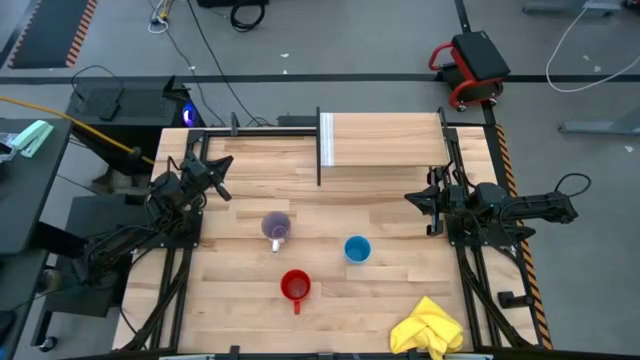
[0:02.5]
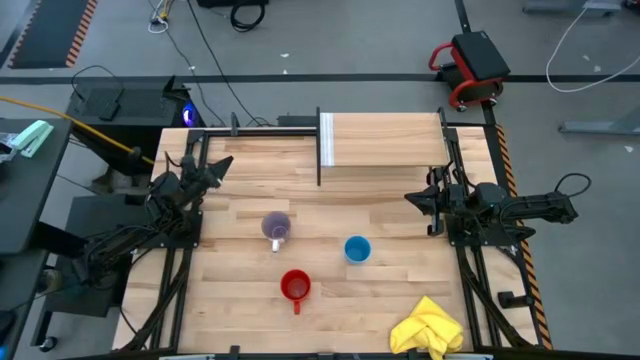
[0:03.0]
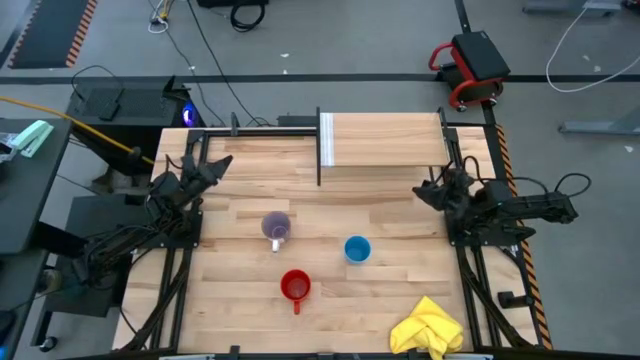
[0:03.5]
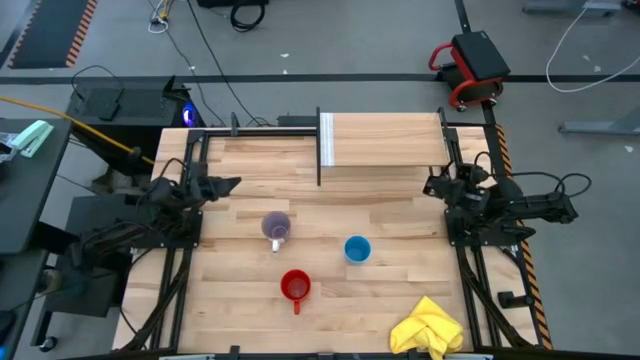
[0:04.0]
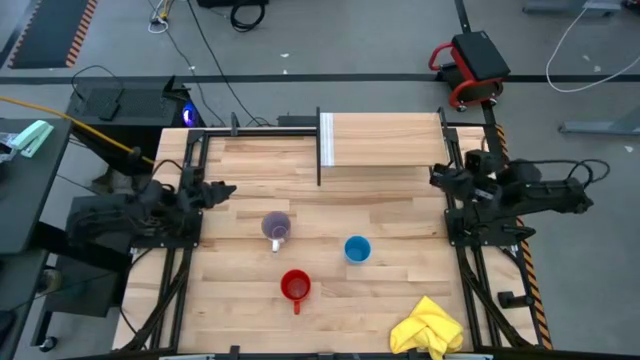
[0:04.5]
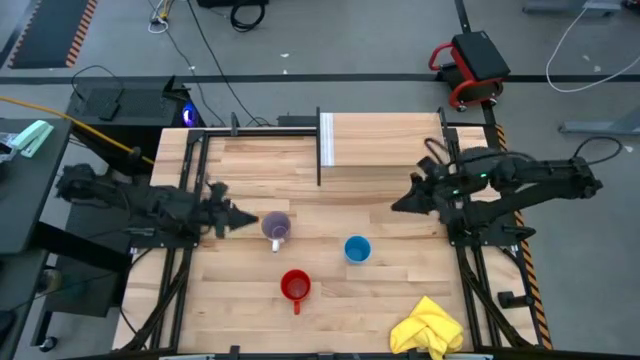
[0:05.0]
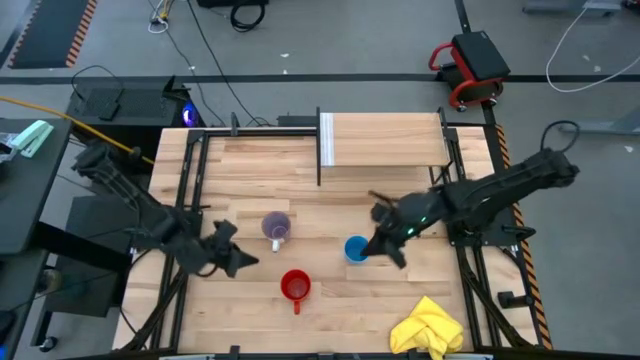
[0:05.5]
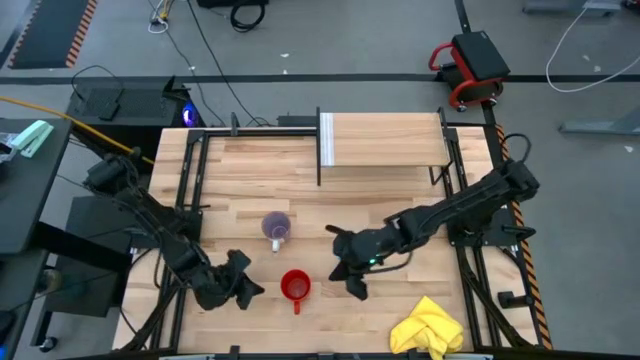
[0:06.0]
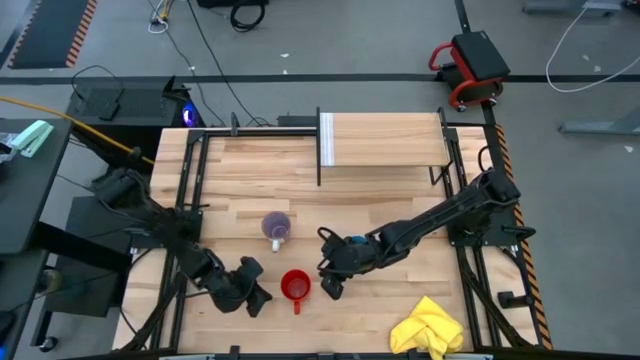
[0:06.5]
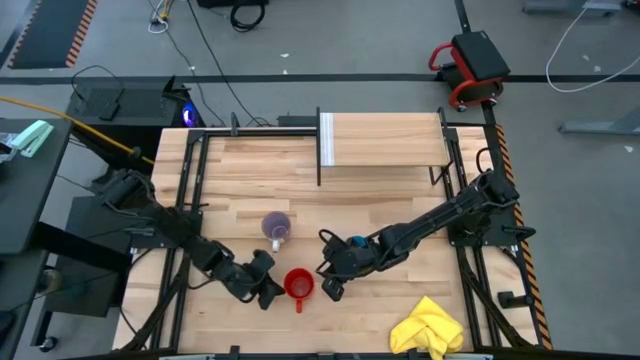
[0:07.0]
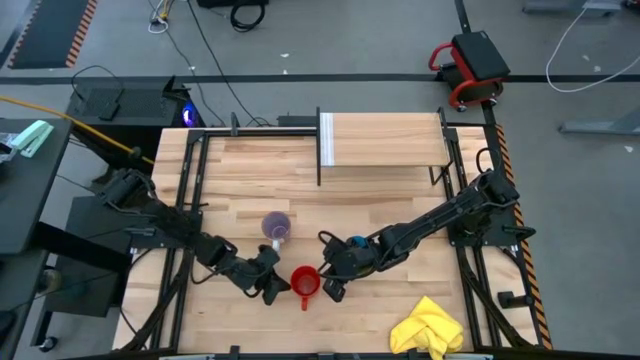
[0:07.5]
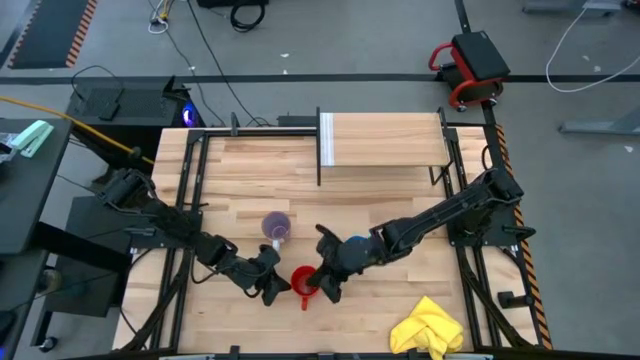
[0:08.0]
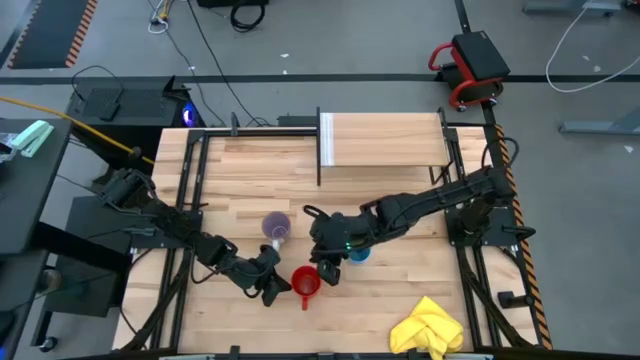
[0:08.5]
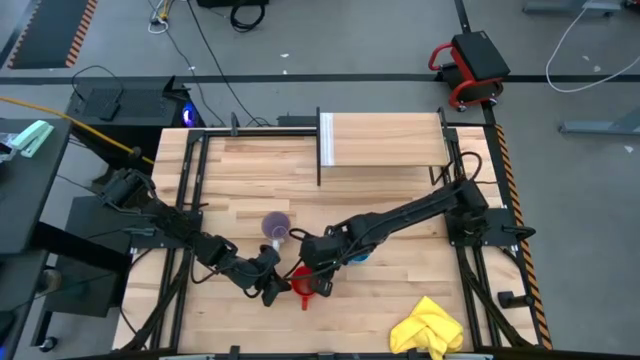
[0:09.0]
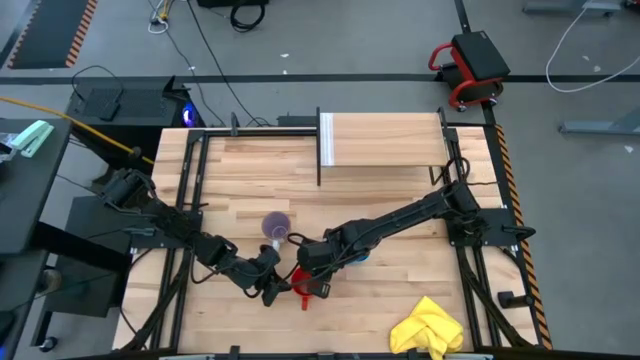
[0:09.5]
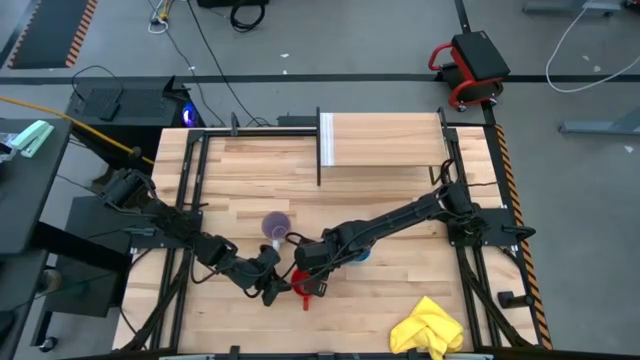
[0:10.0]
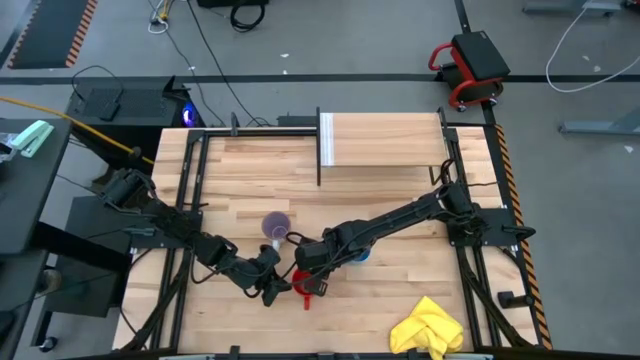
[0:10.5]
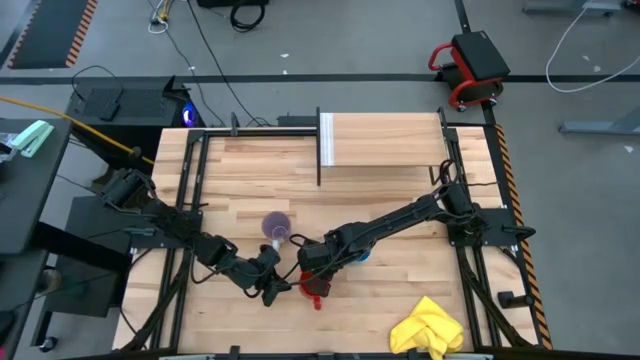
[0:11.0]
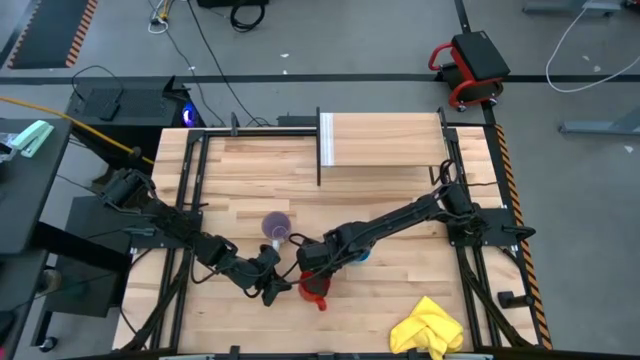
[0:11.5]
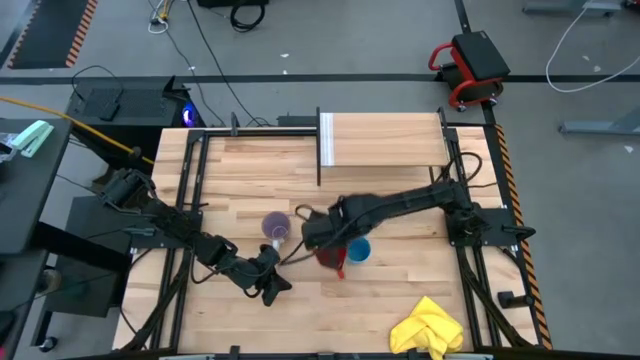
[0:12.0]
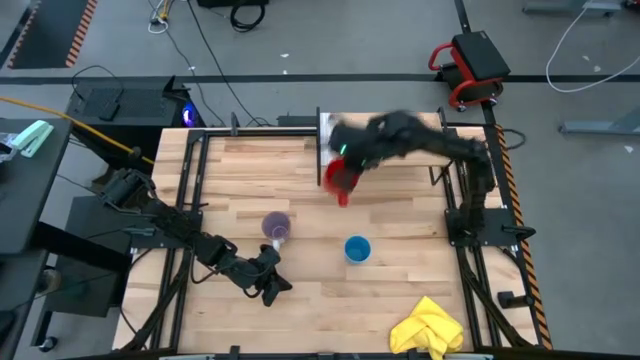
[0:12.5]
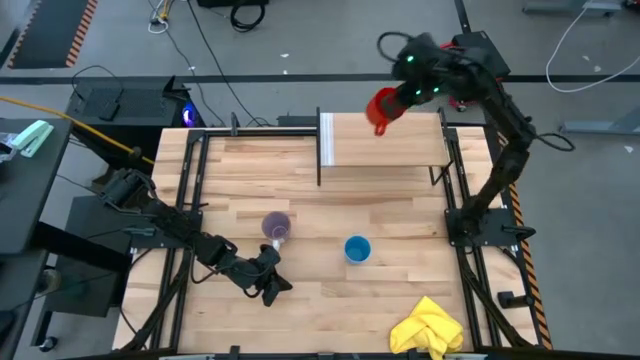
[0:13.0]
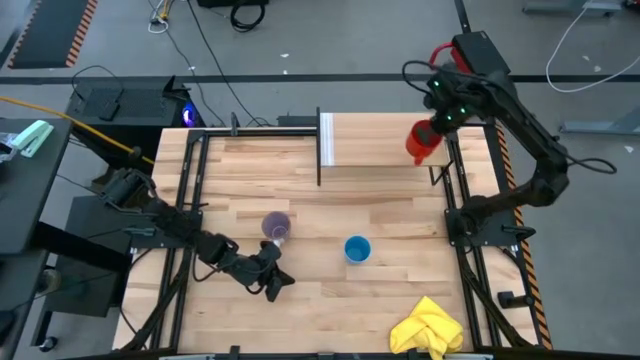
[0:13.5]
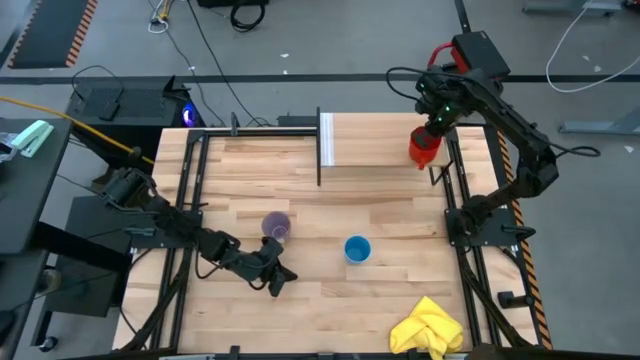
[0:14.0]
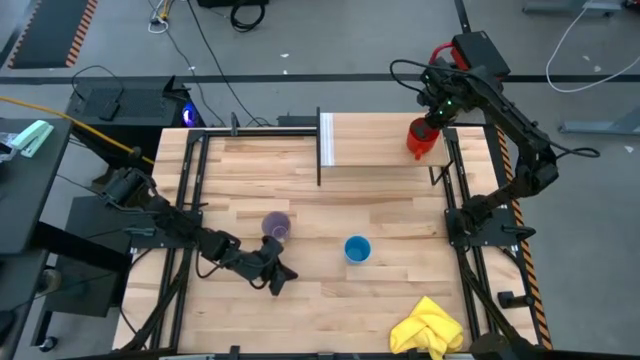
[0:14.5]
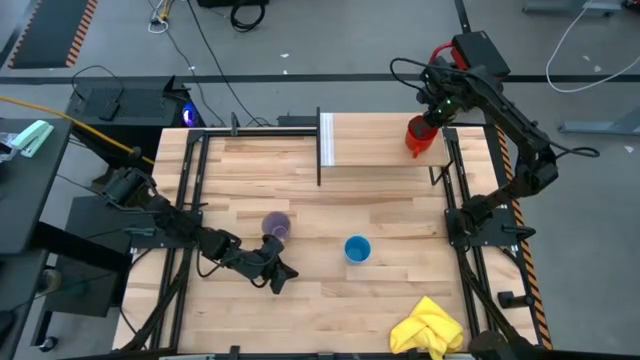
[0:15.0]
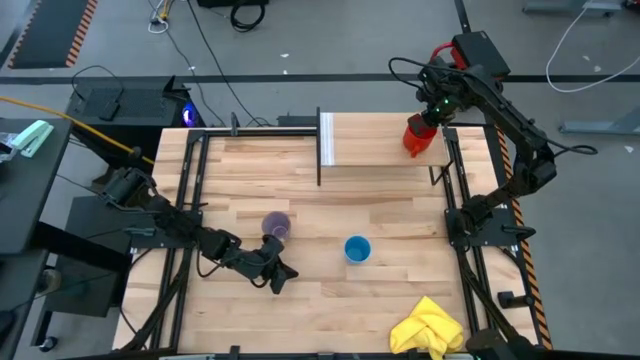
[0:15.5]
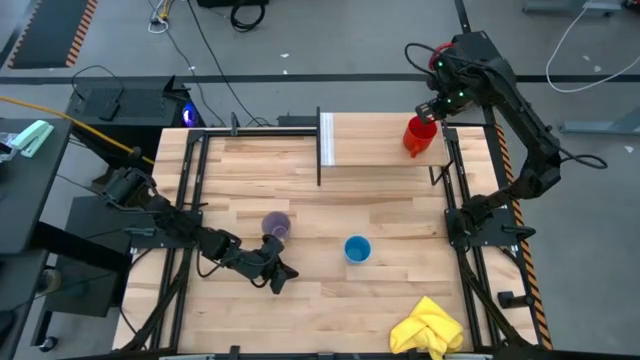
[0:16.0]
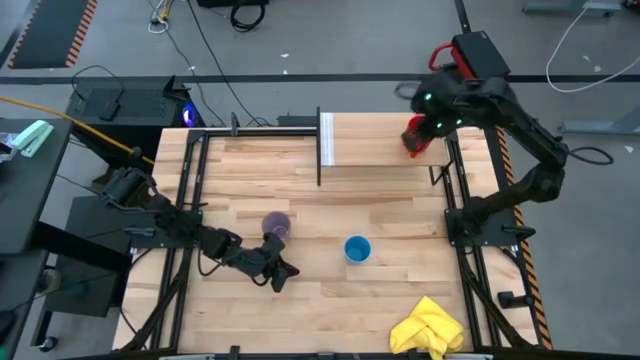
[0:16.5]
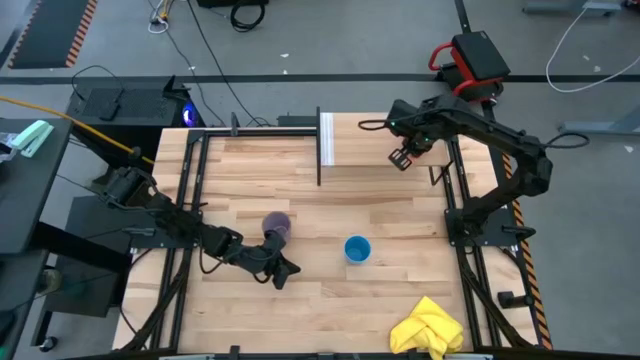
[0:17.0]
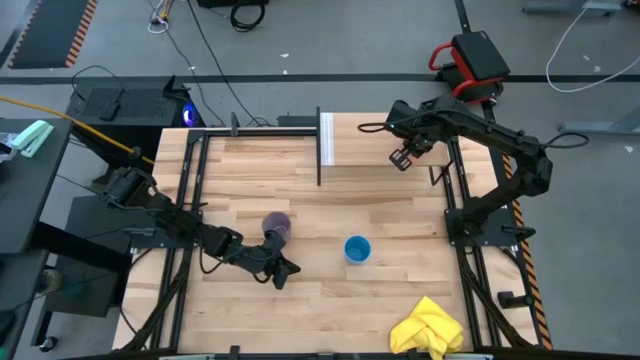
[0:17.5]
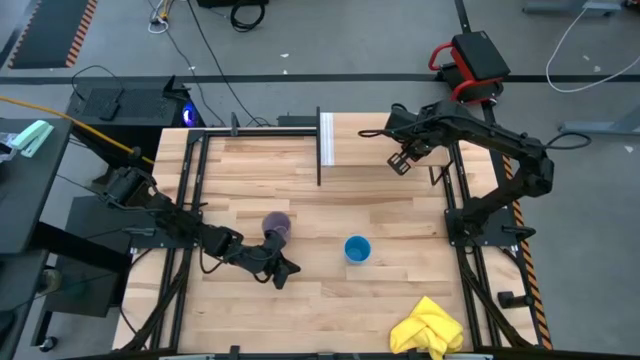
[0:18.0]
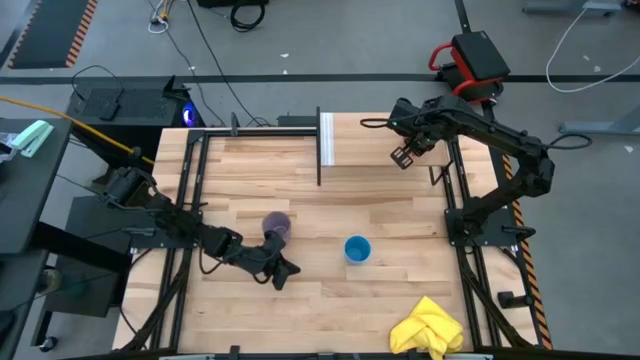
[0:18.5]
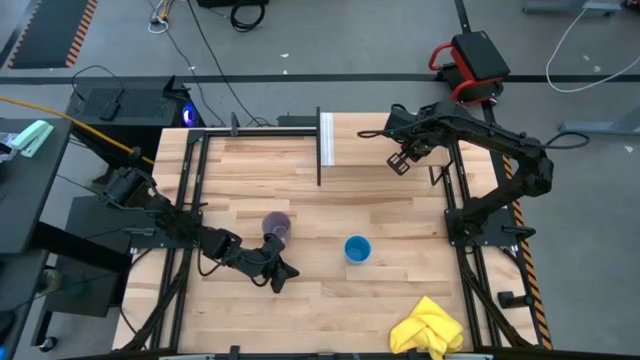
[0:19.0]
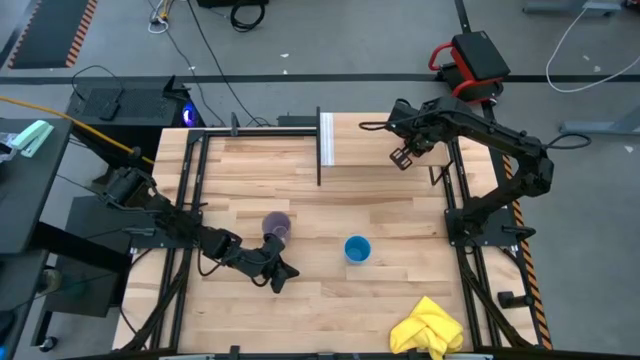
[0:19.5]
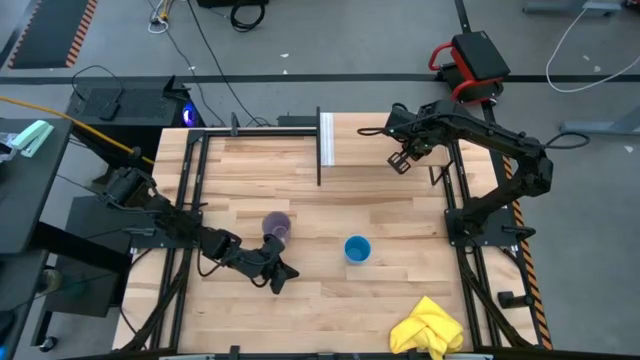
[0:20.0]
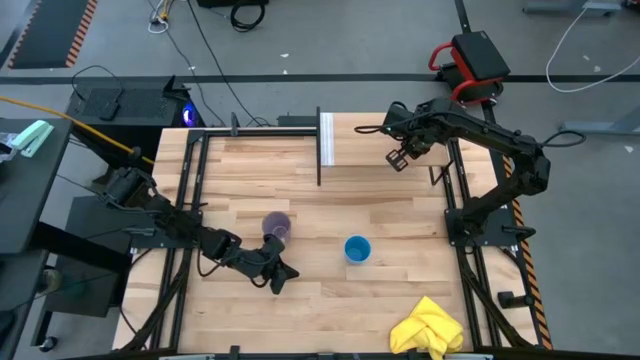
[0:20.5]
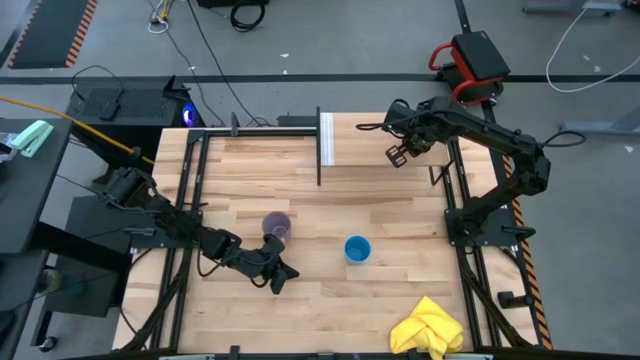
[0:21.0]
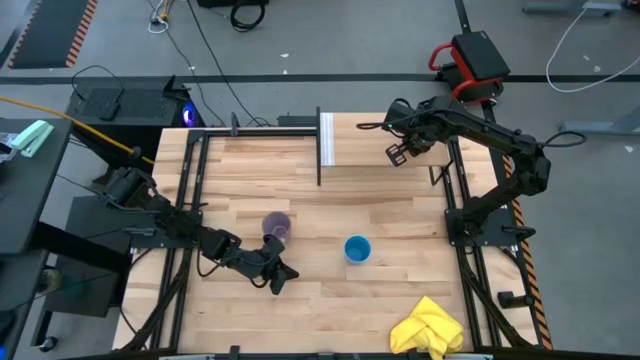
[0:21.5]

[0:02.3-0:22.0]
Task: Stack small to large cups/mugs on shelf
Put the red mug on the shelf

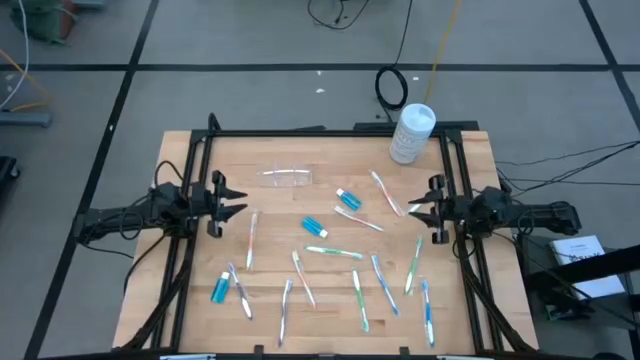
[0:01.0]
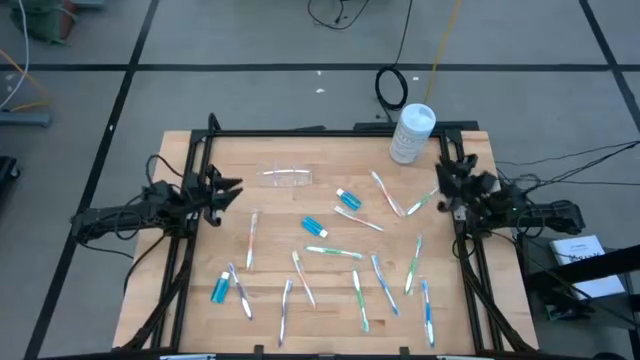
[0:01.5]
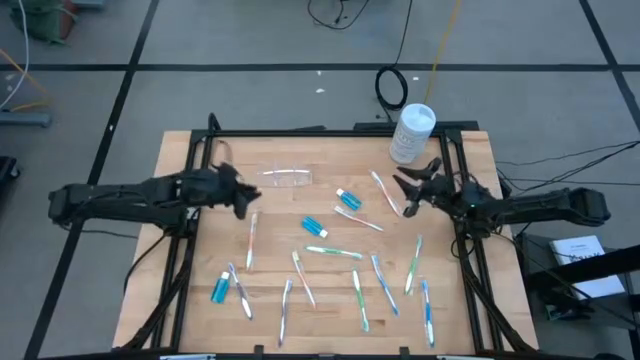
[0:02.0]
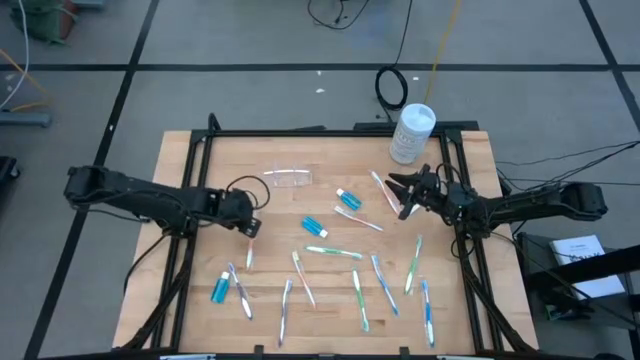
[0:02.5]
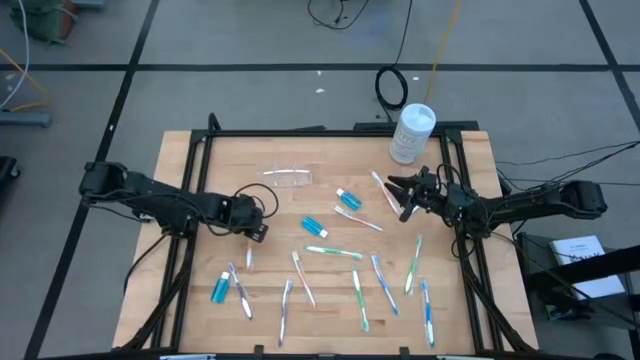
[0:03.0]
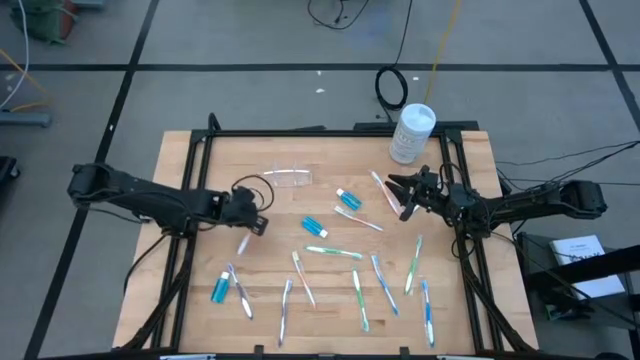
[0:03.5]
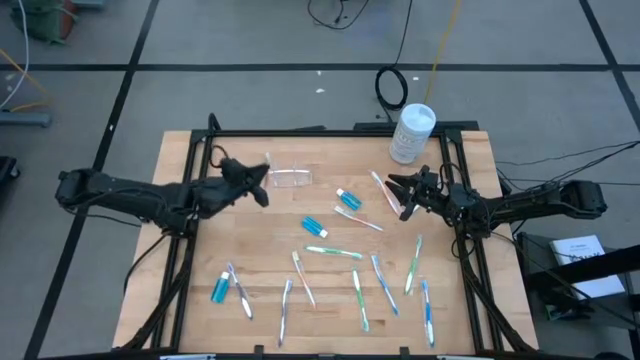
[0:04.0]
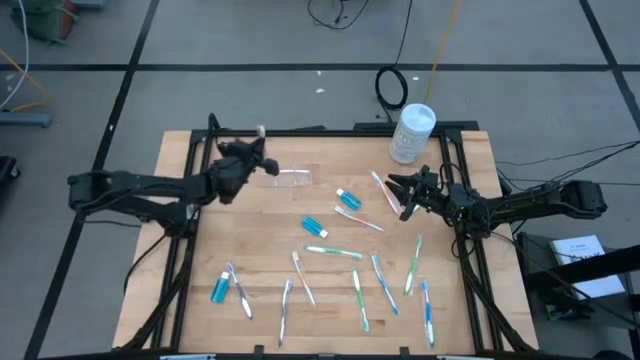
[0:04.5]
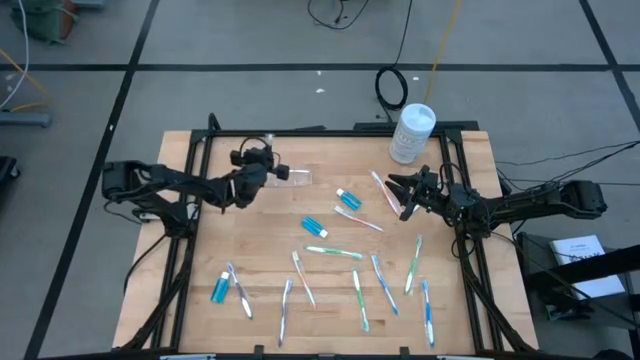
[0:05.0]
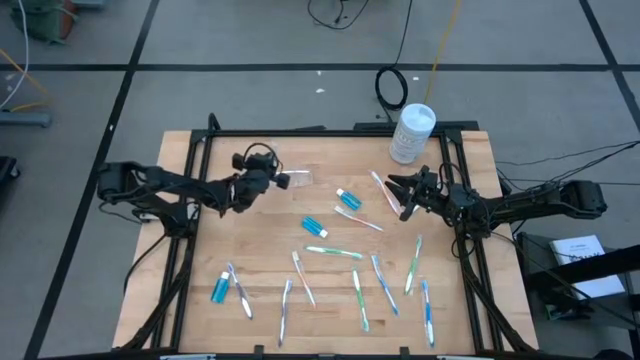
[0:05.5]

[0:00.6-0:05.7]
Task: Pick & Place toothbrushing station
Put the orange toothbrush into the transparent organizer
